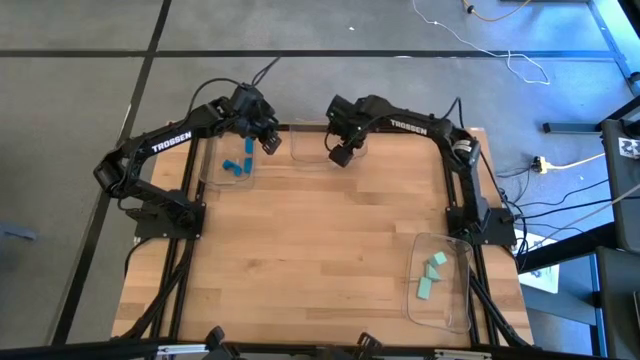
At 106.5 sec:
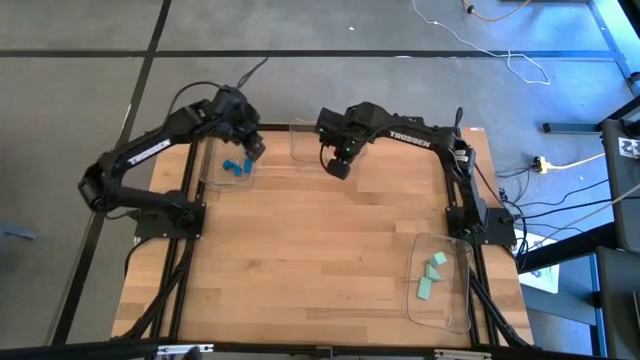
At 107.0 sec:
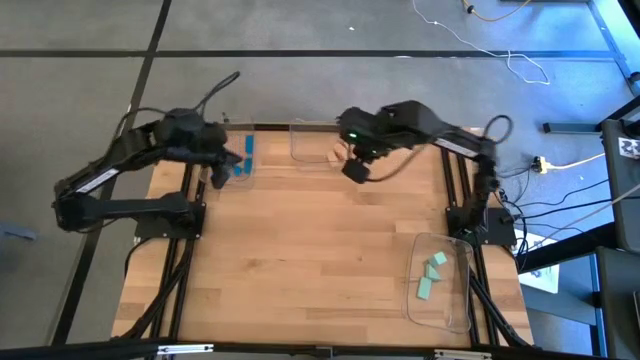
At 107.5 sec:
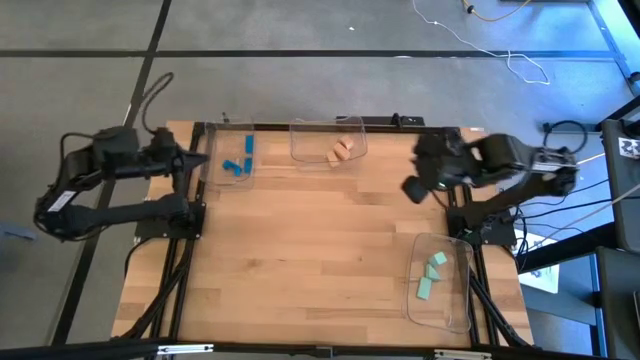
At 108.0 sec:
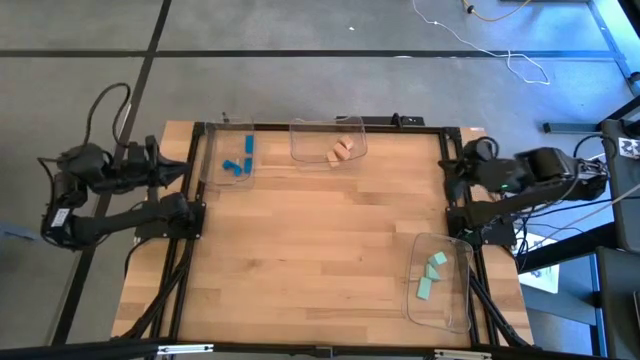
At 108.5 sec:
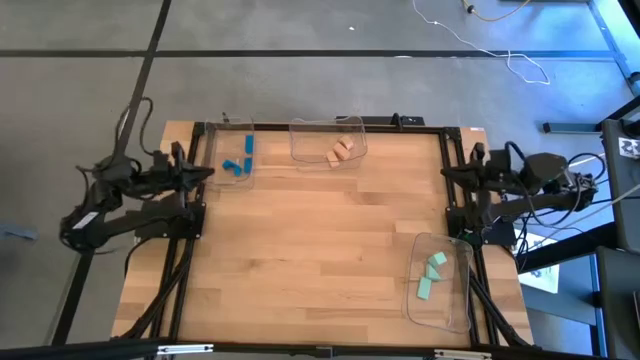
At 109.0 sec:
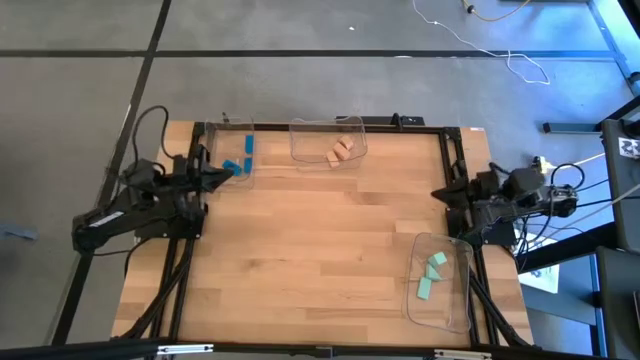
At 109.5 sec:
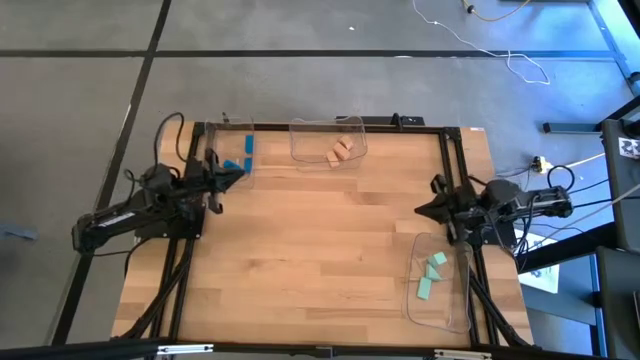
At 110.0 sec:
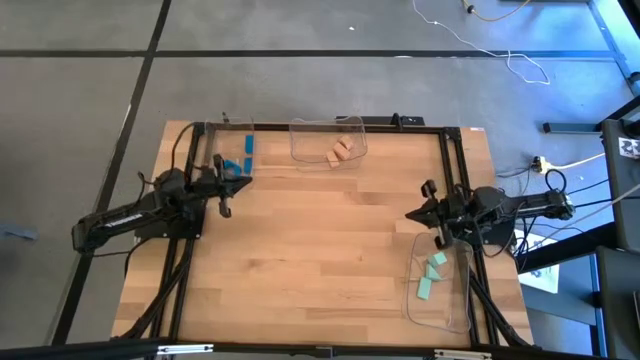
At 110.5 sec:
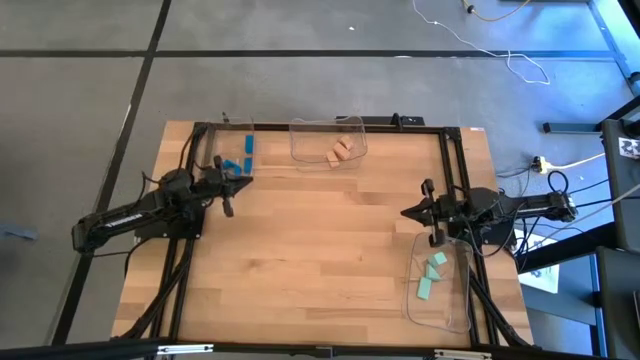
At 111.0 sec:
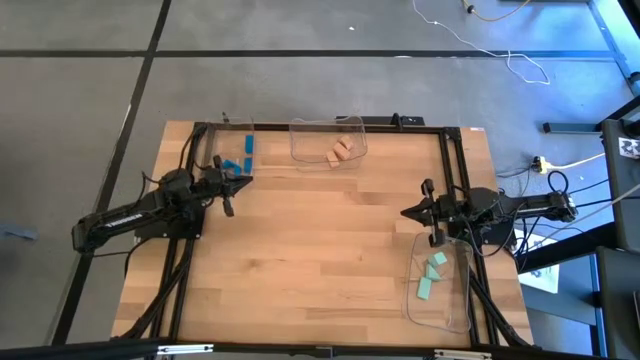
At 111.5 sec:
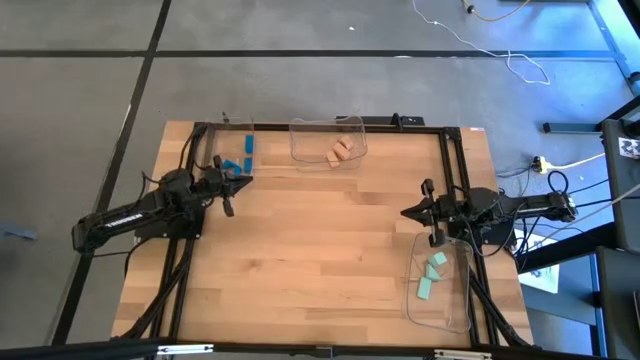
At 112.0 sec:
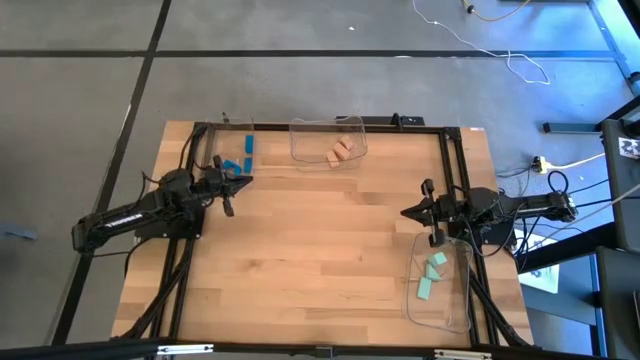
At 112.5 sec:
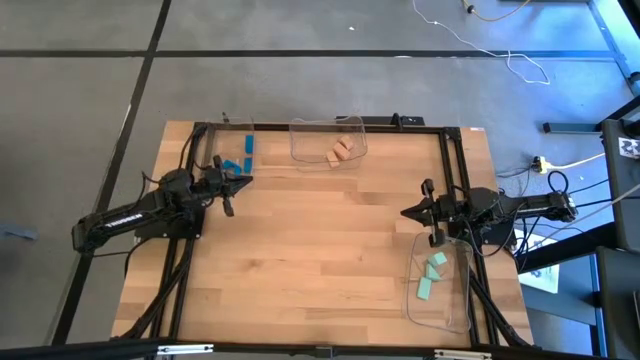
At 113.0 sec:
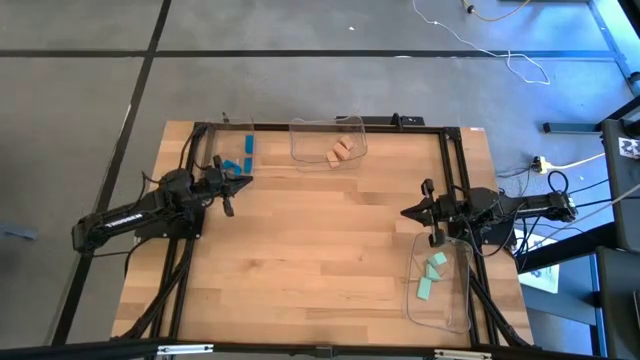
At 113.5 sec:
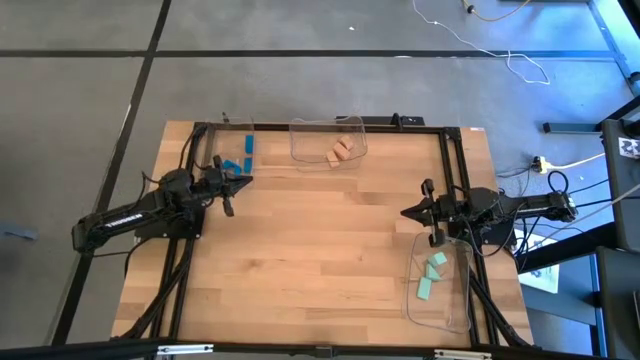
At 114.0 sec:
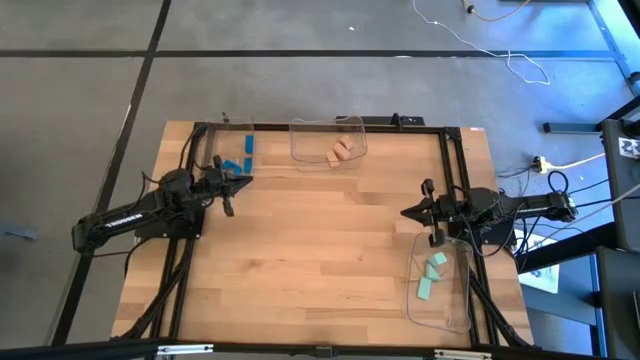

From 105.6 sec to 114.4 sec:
Task: Sort & place blocks by color
Return to Home Position

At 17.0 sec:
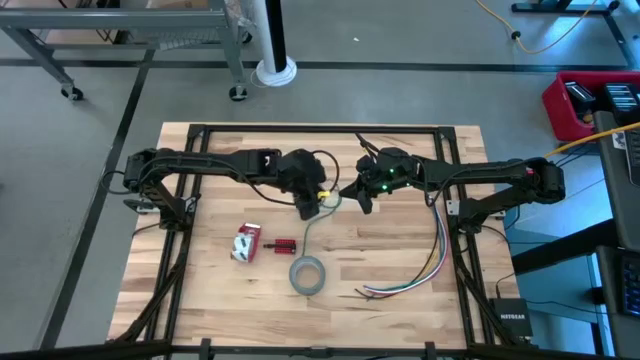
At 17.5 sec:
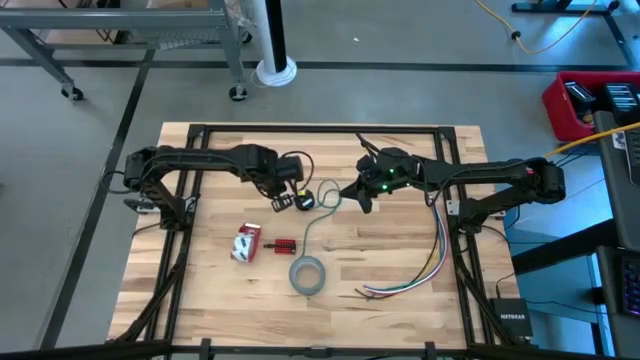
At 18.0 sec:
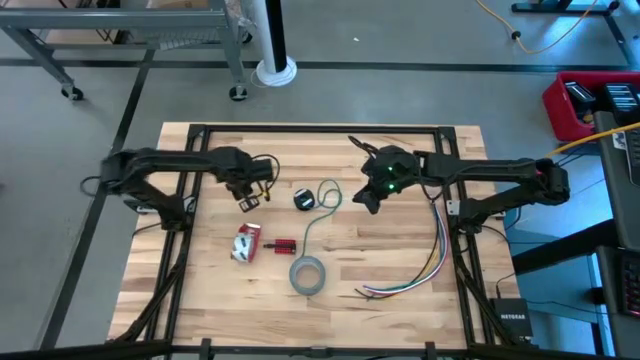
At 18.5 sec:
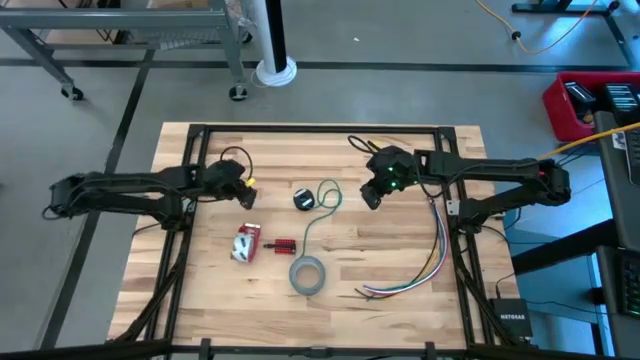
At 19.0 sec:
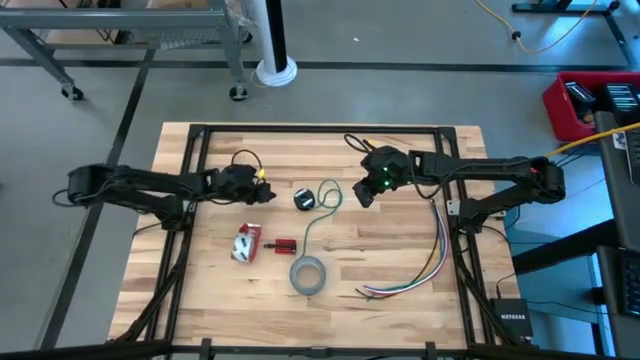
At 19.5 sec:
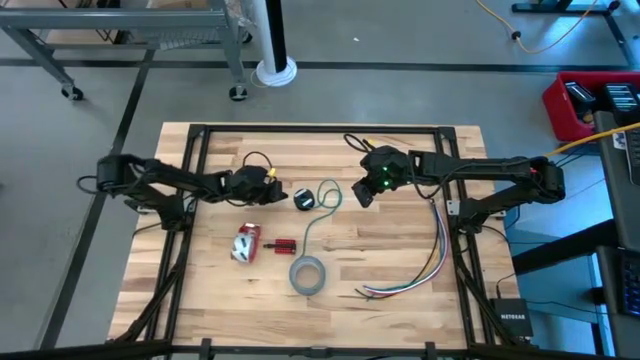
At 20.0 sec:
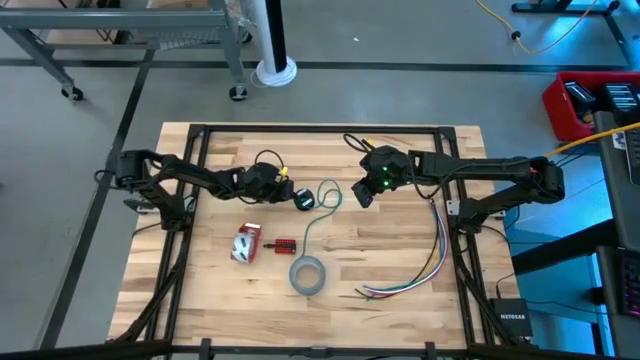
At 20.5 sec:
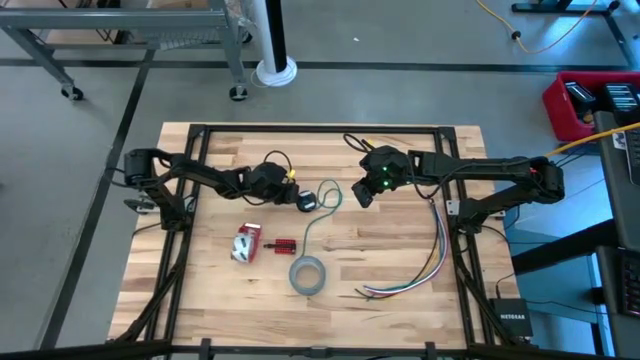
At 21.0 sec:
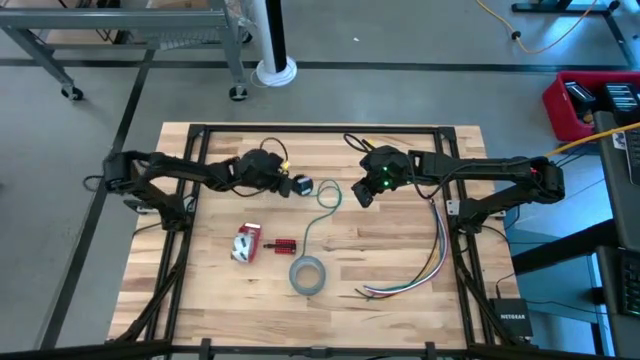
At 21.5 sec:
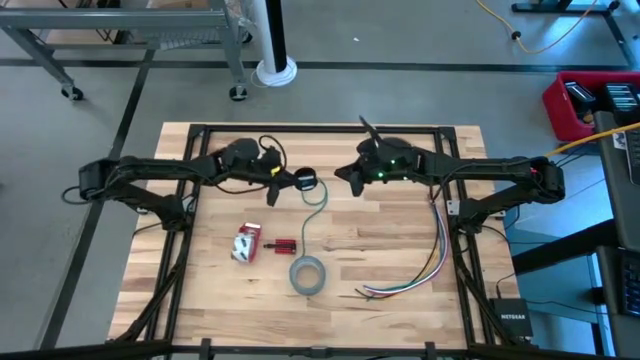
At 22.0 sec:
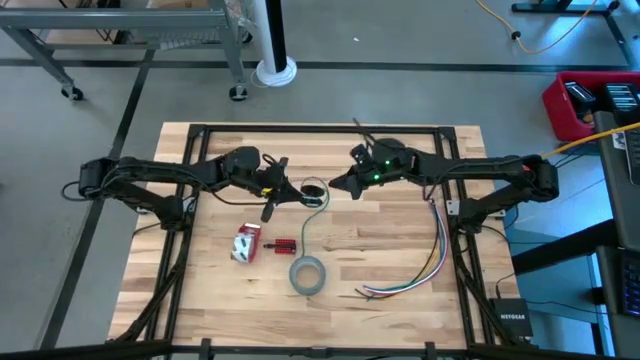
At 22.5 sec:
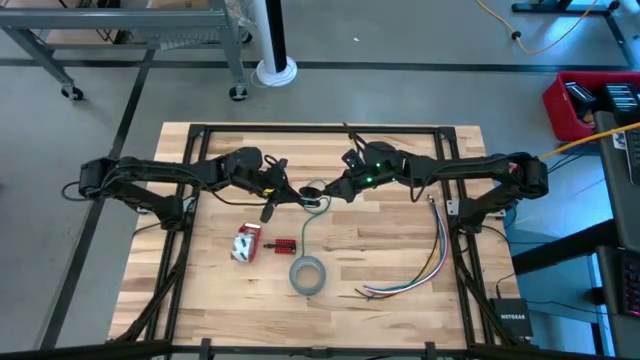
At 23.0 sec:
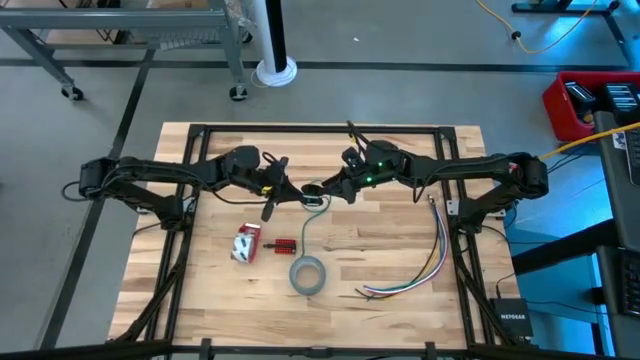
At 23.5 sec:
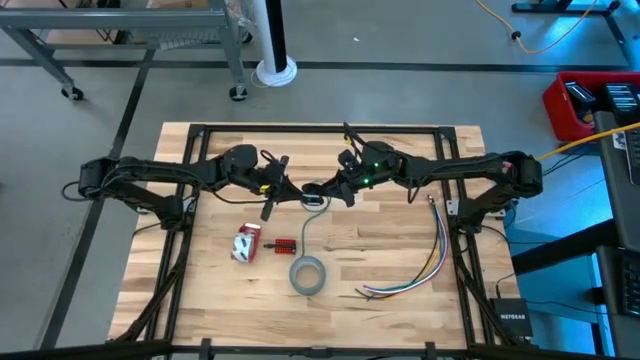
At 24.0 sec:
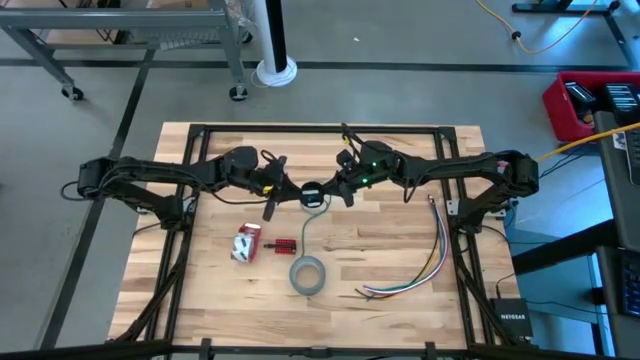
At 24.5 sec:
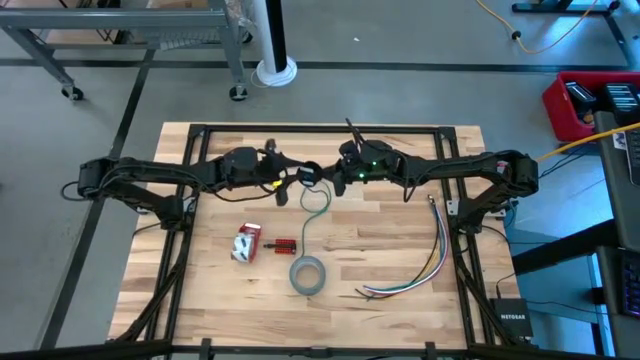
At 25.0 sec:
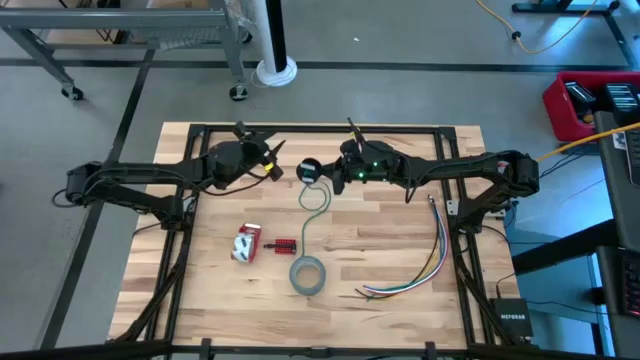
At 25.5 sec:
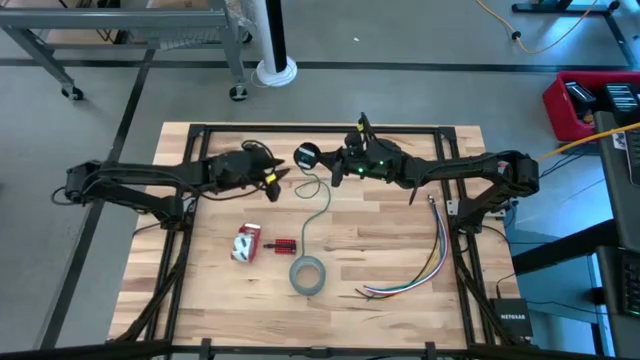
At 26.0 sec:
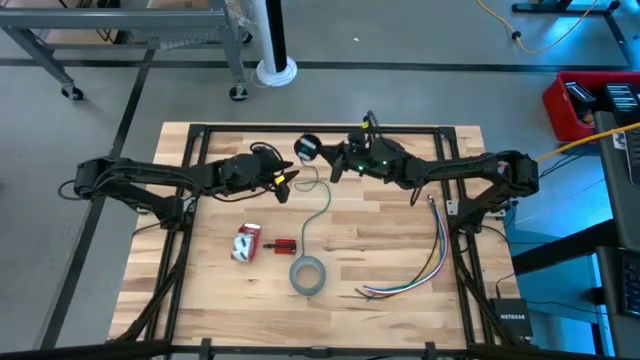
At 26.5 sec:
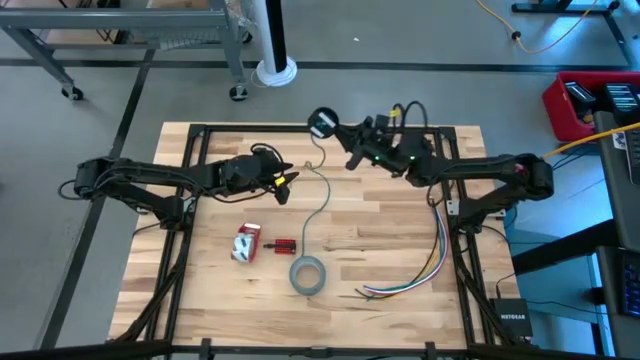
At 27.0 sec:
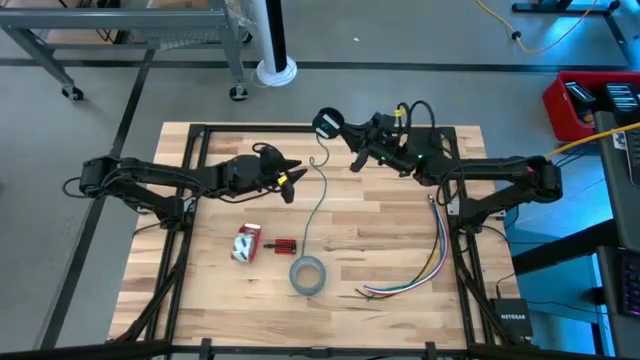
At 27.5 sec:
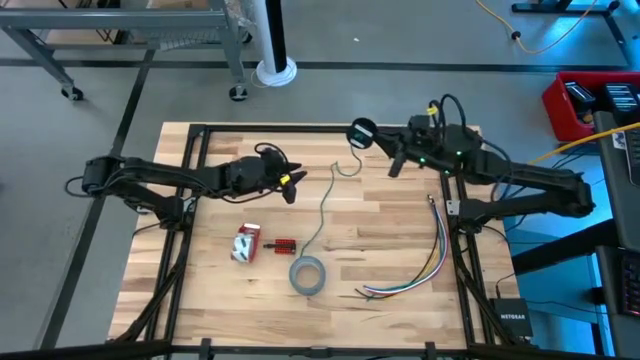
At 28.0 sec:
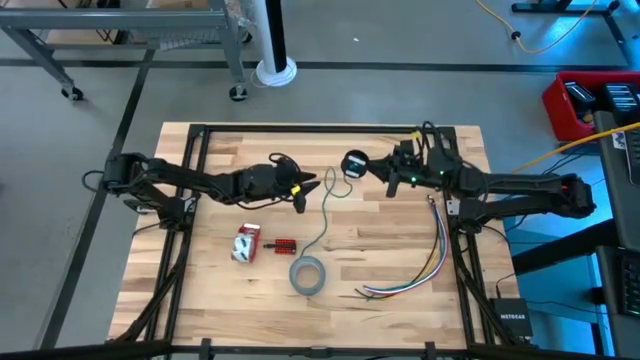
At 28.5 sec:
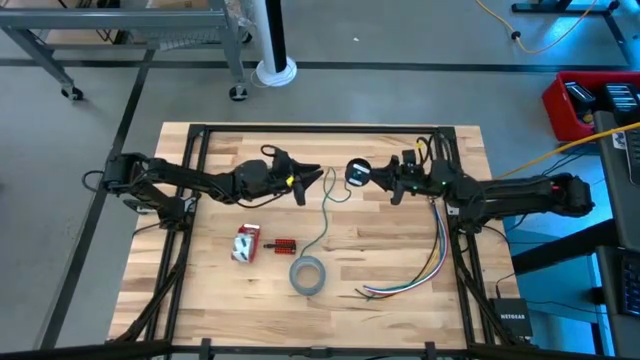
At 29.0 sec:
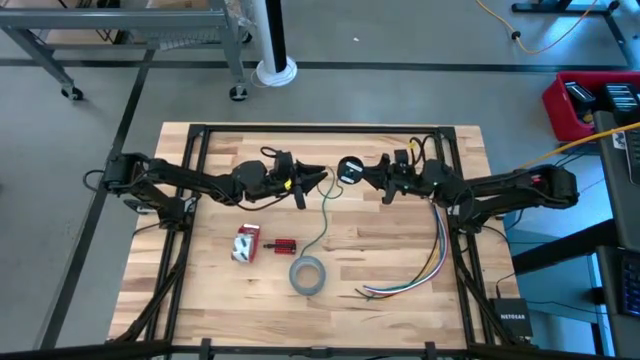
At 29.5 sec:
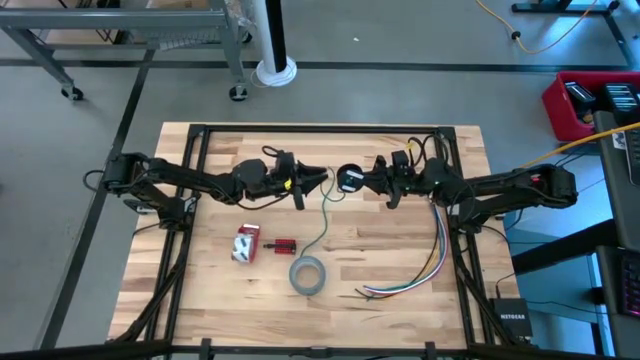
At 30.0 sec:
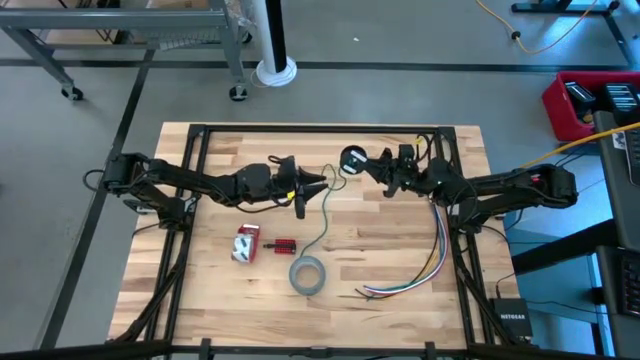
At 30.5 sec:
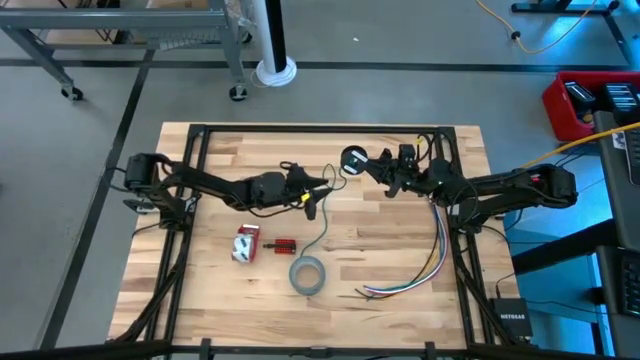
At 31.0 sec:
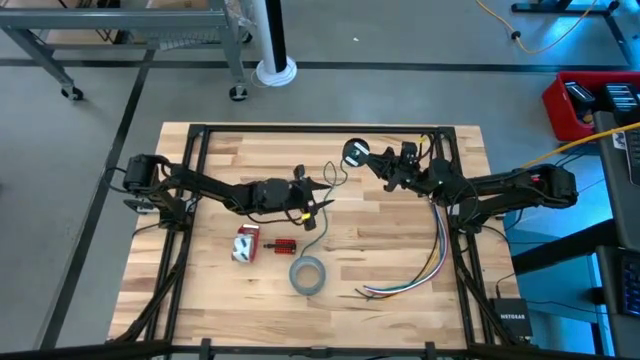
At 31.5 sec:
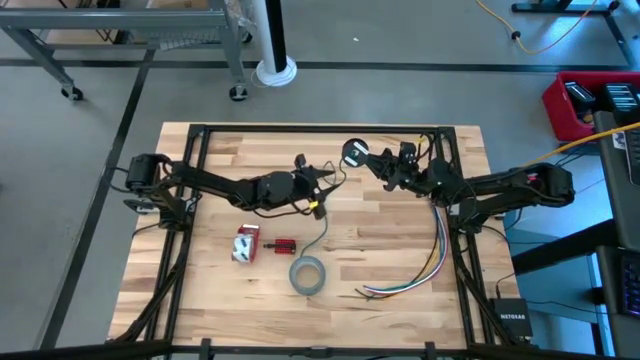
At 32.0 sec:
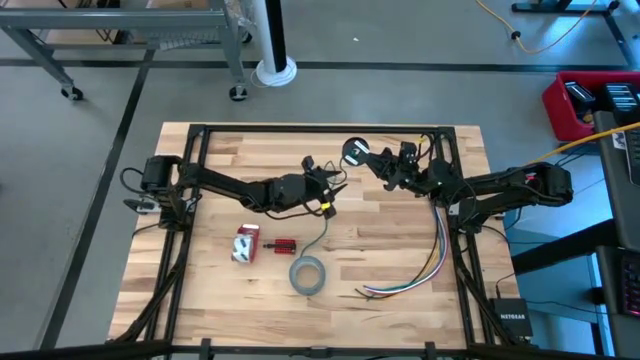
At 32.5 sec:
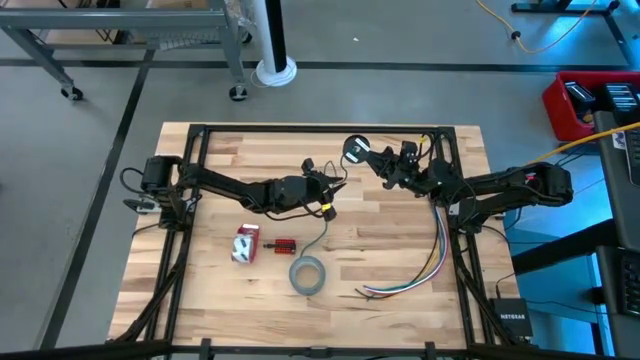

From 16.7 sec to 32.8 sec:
Task: Coil cords
Prepare the spool
